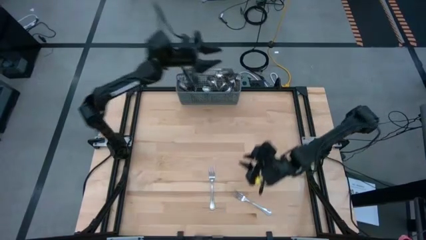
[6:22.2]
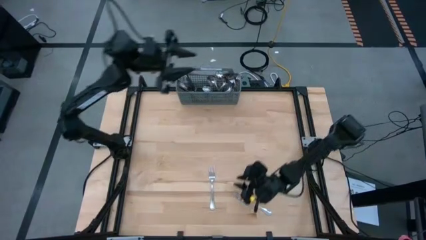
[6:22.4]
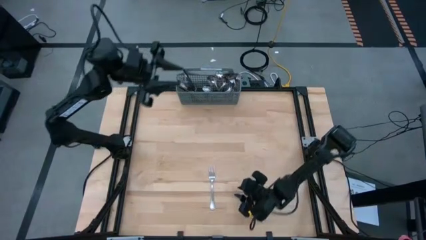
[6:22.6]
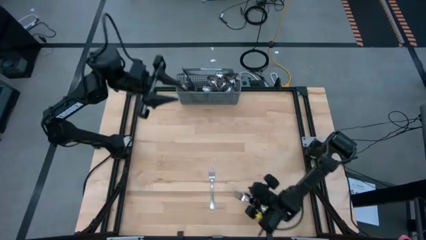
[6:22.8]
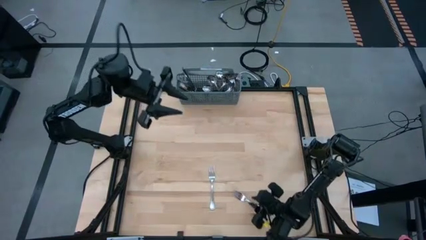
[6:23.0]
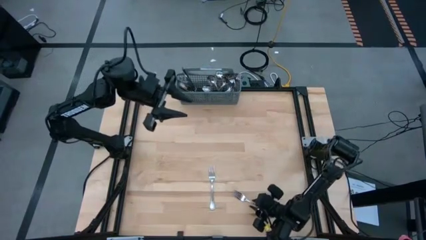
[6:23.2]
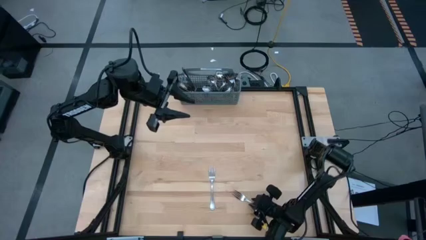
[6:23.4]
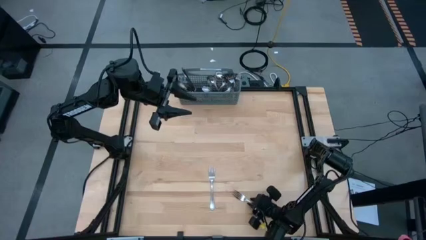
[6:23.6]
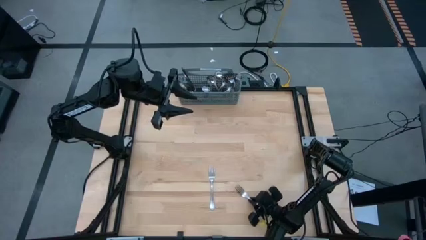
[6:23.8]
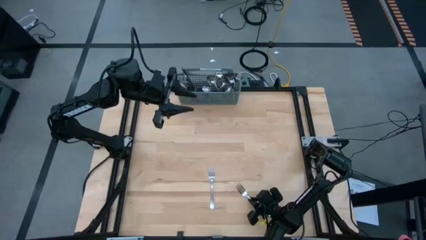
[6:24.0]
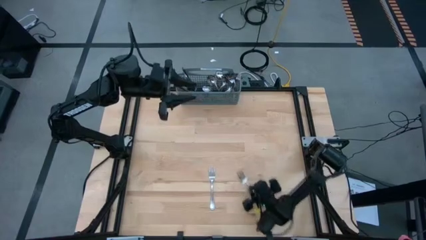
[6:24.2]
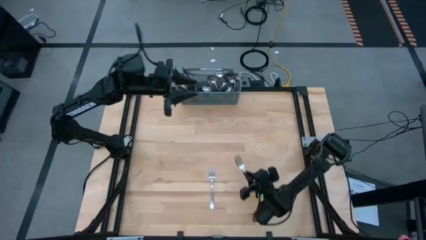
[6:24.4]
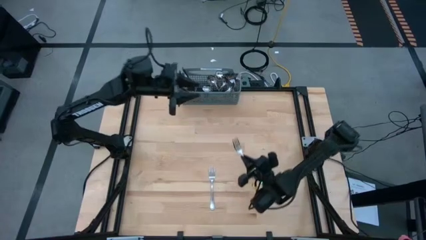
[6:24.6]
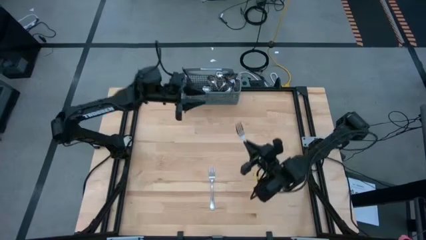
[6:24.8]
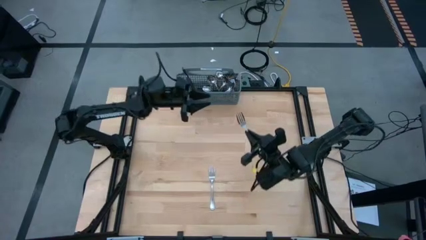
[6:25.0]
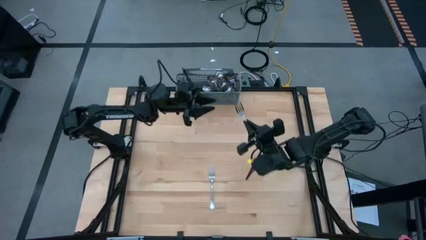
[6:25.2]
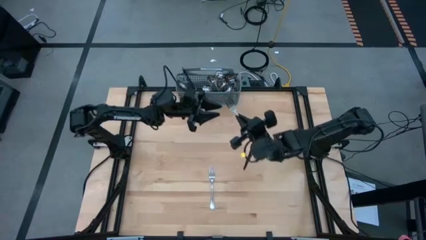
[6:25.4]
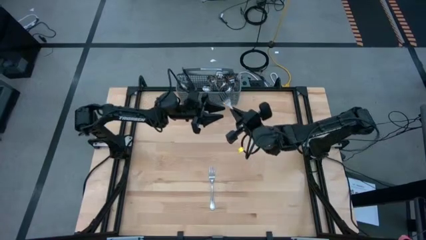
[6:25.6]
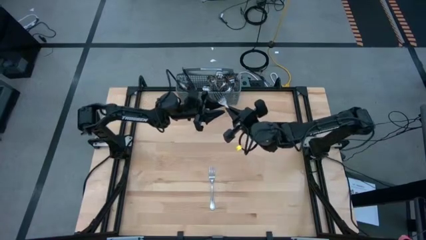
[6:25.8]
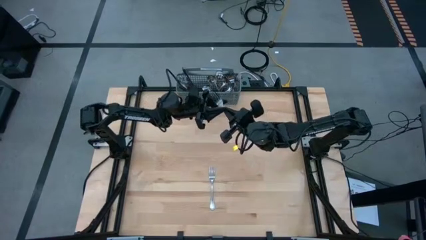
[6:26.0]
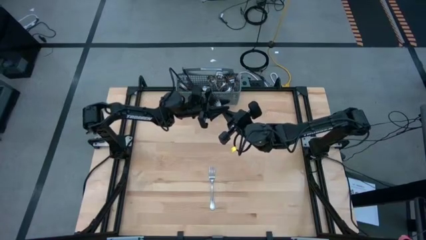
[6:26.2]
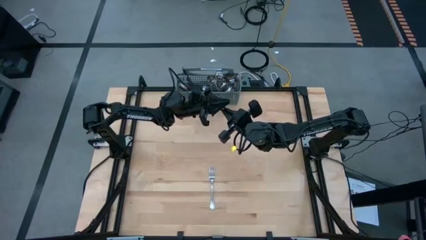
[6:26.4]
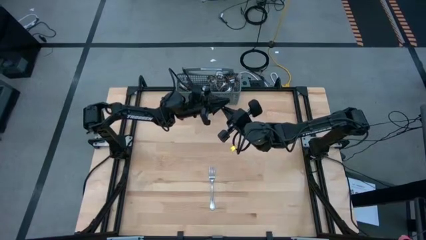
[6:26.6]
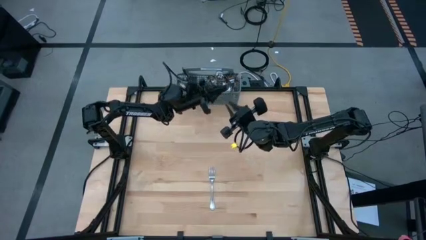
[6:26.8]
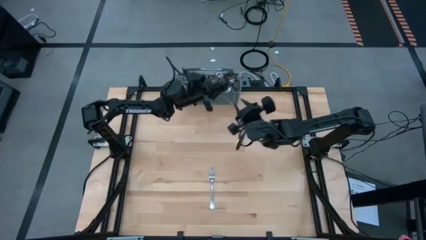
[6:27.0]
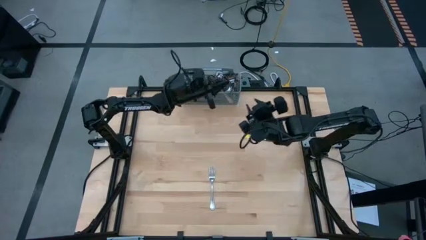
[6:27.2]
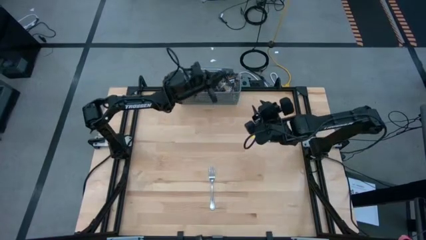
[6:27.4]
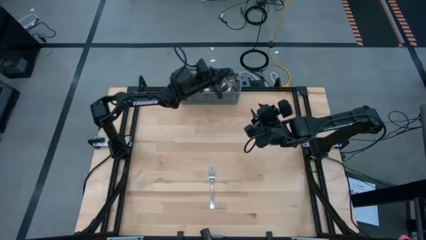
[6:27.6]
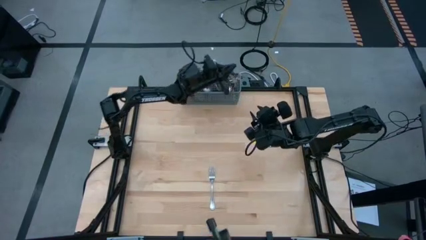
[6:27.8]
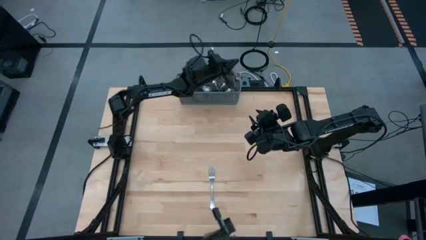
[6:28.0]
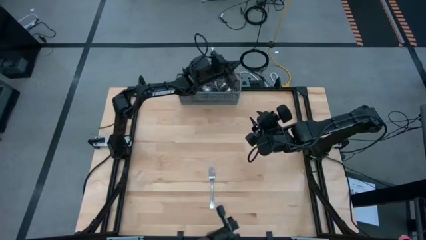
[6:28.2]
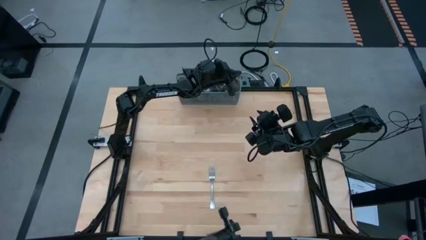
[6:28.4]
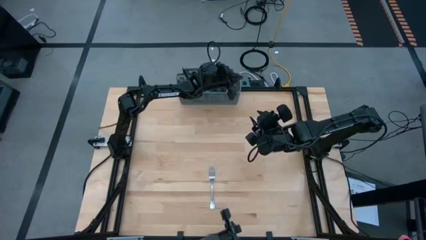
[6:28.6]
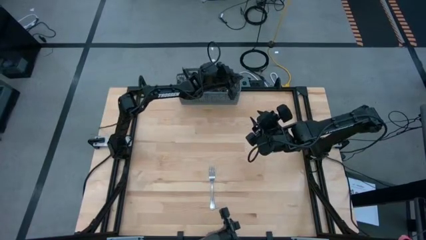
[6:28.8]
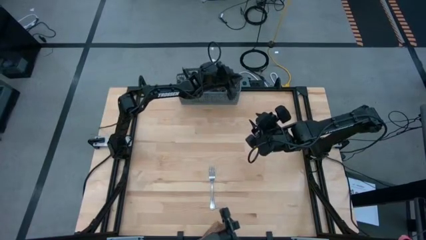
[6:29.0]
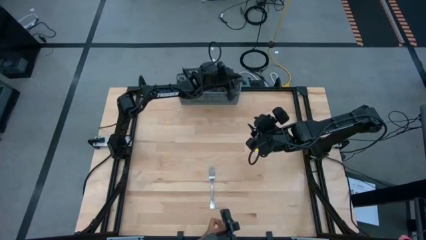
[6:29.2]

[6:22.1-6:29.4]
Task: Sort silverware
Put the silver fork into the utensil holder

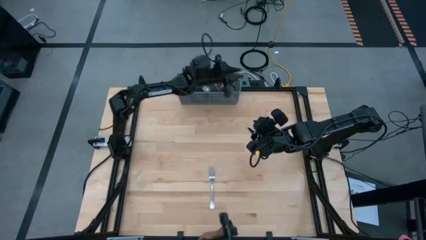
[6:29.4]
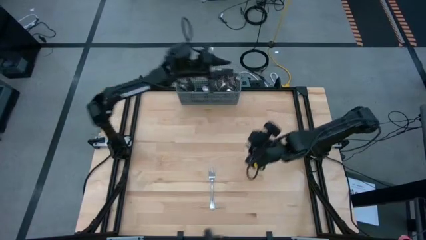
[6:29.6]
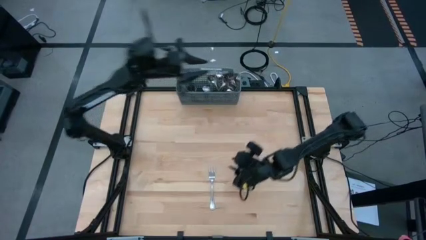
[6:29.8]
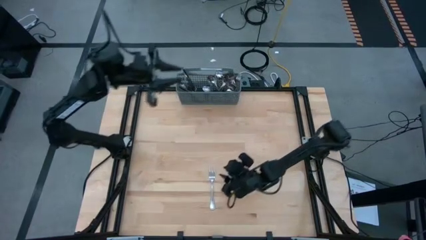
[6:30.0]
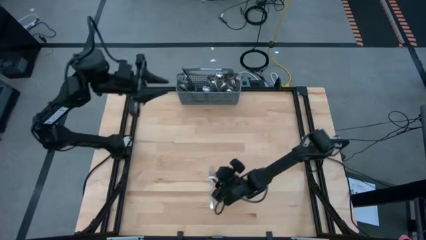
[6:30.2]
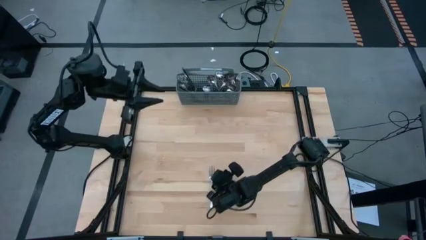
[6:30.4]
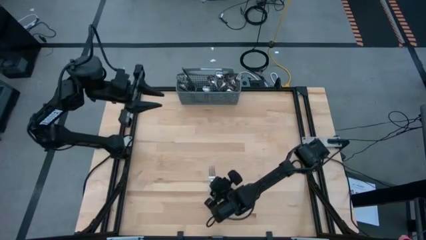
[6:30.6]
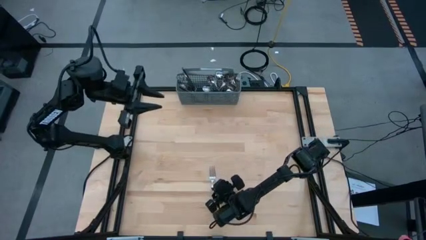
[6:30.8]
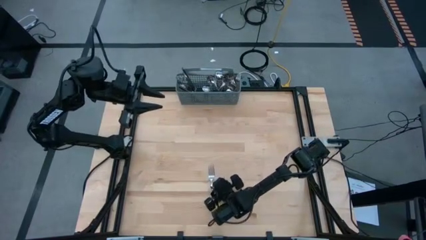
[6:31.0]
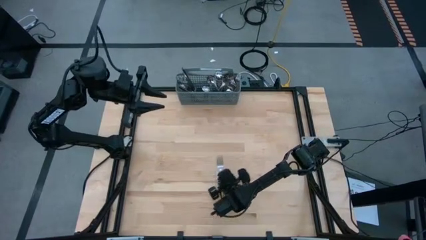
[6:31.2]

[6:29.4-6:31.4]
Put the silver fork into the utensil holder

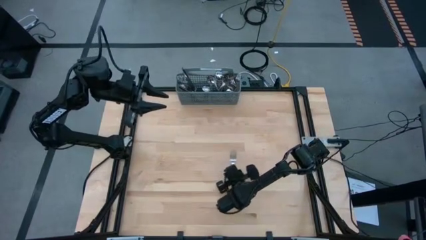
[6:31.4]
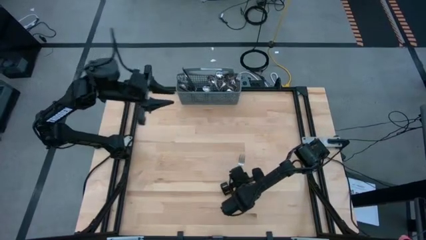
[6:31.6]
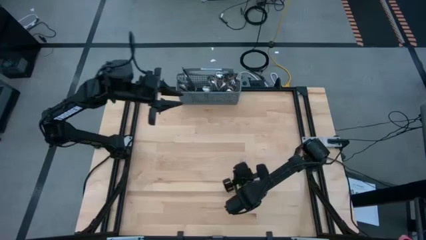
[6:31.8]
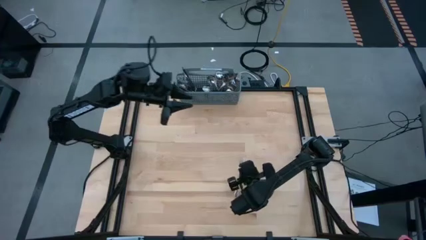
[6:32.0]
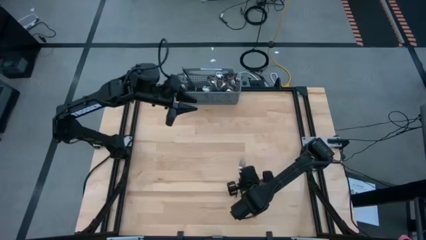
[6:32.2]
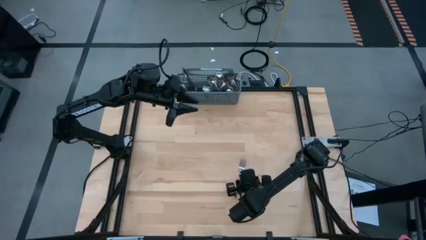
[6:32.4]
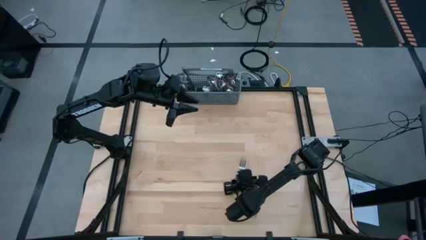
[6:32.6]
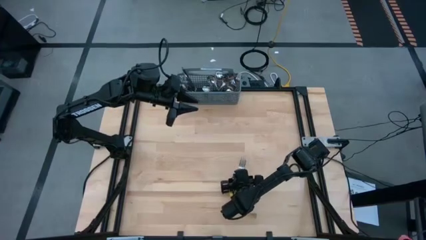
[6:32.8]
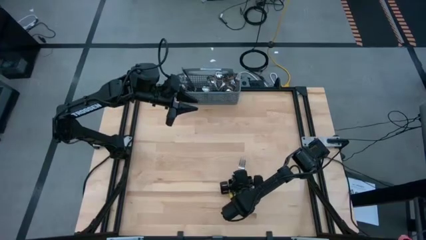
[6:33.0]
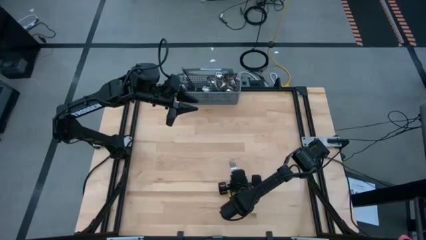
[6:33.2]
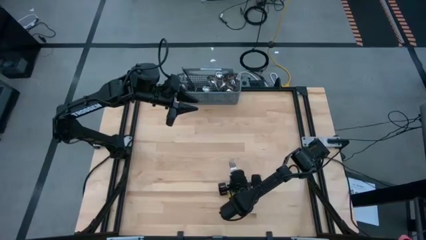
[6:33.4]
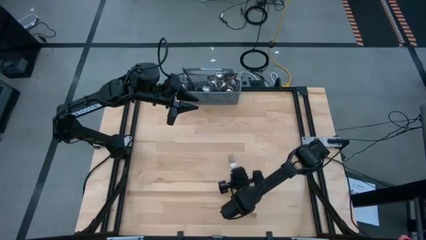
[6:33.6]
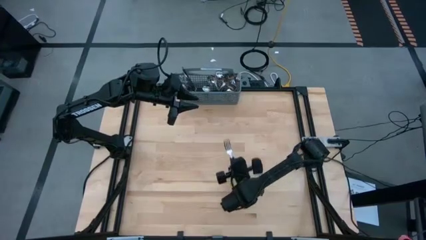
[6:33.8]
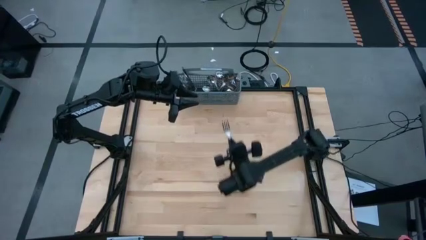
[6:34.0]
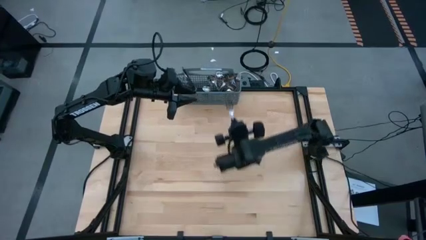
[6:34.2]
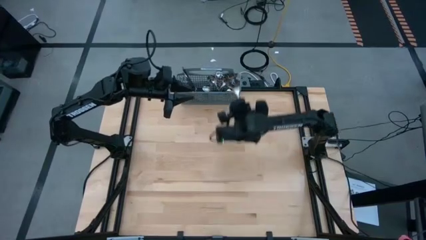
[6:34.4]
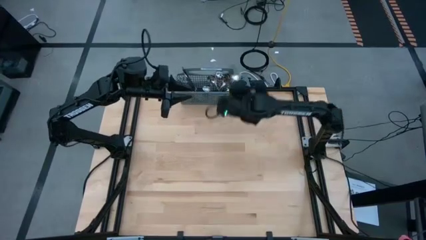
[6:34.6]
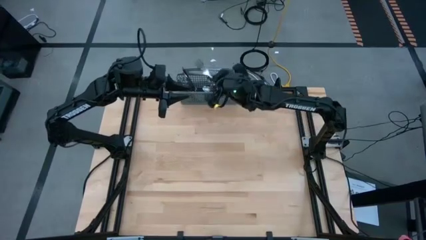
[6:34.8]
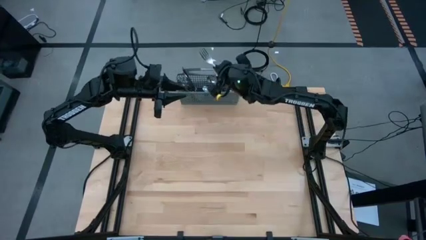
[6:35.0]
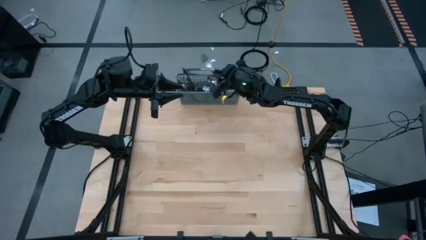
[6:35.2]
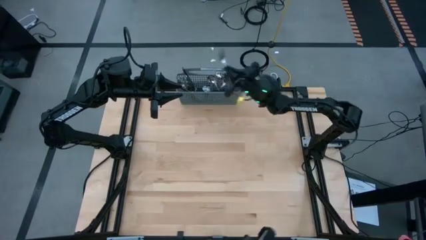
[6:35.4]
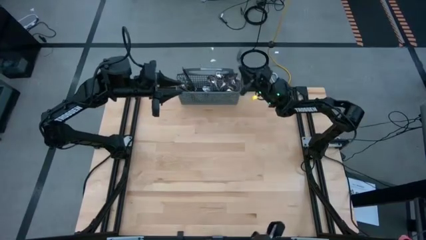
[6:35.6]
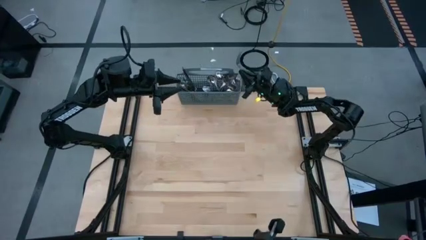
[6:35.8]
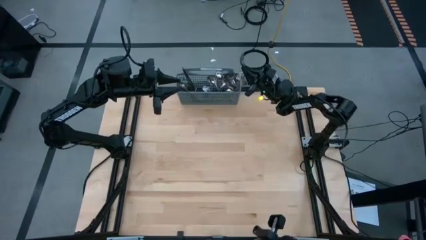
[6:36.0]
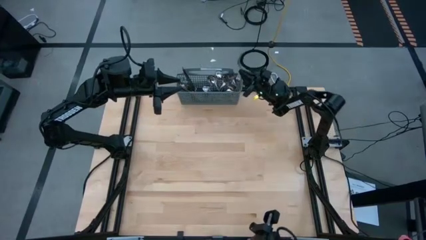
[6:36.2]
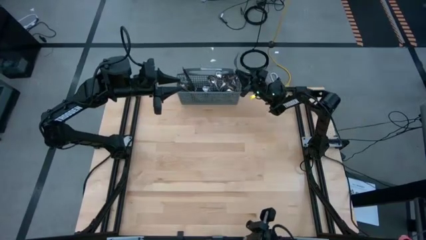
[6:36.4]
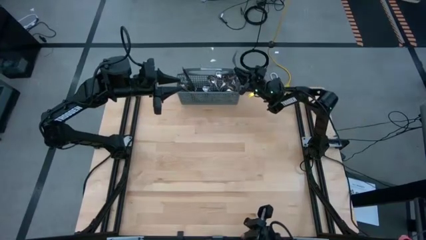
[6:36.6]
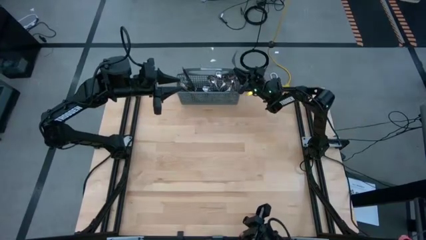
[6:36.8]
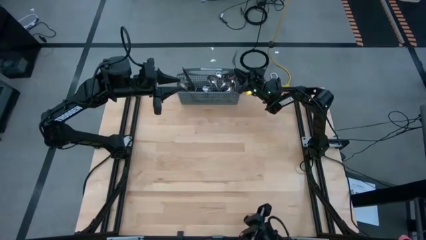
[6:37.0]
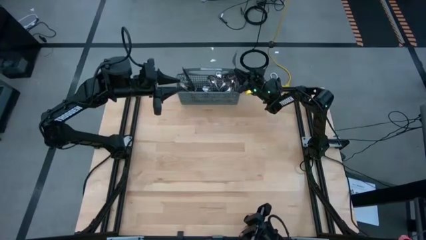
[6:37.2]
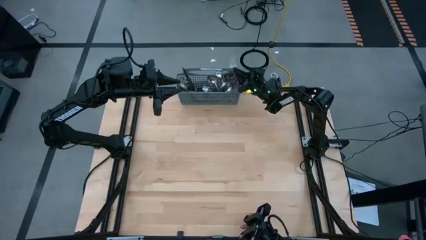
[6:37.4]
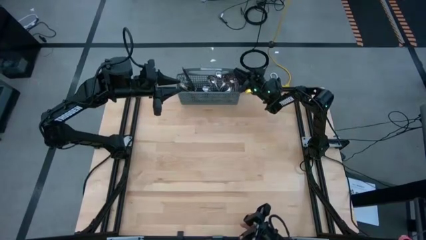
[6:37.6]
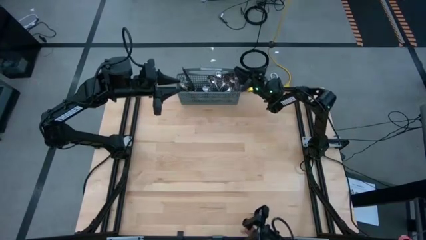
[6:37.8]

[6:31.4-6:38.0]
Put the silver fork into the utensil holder
